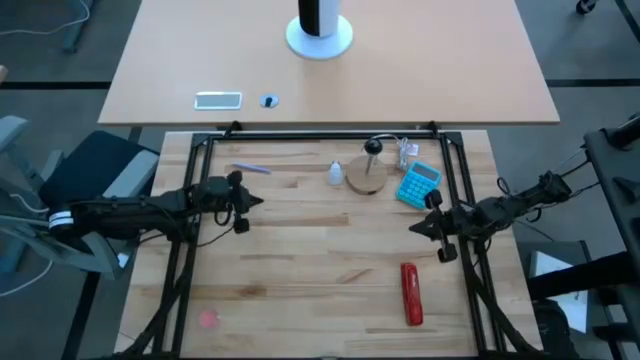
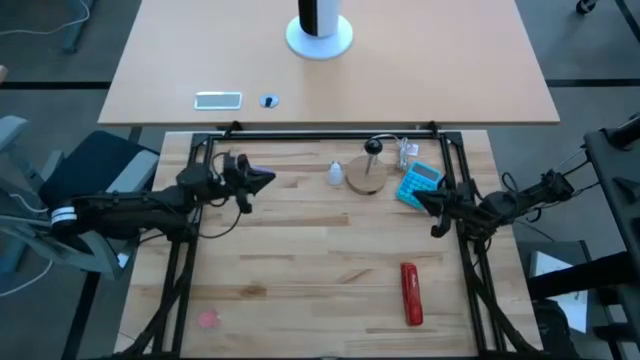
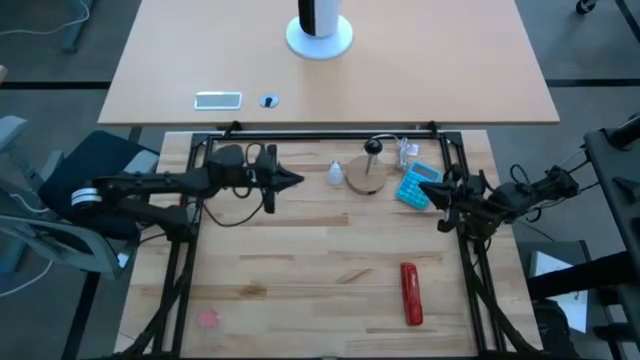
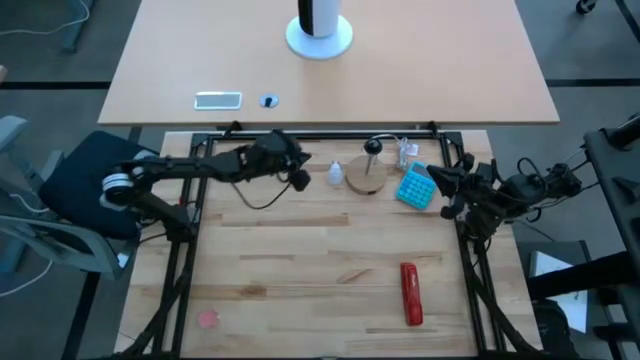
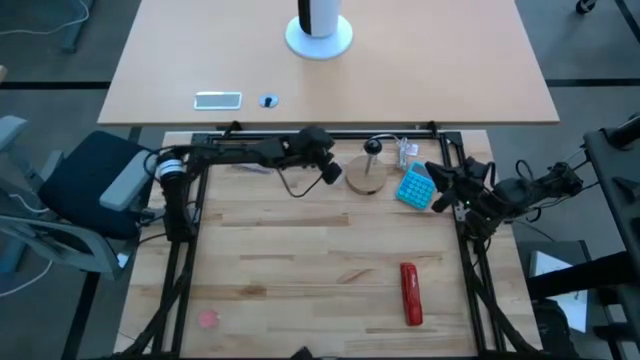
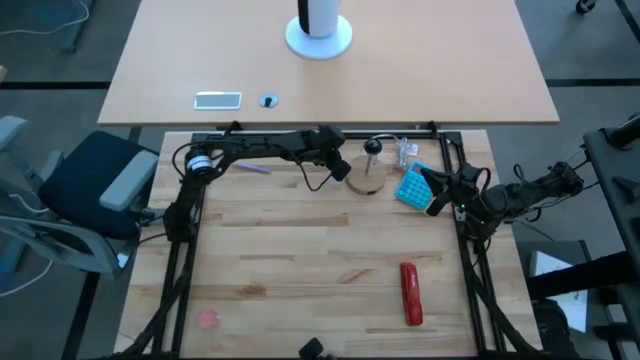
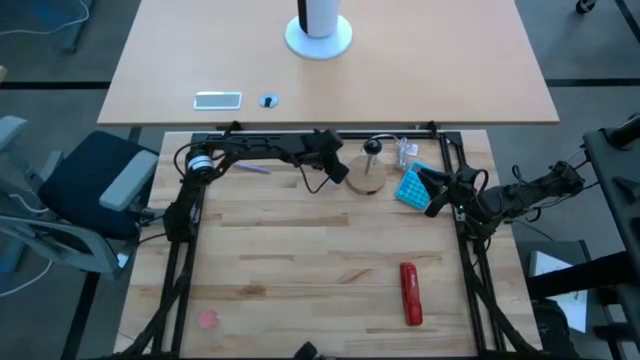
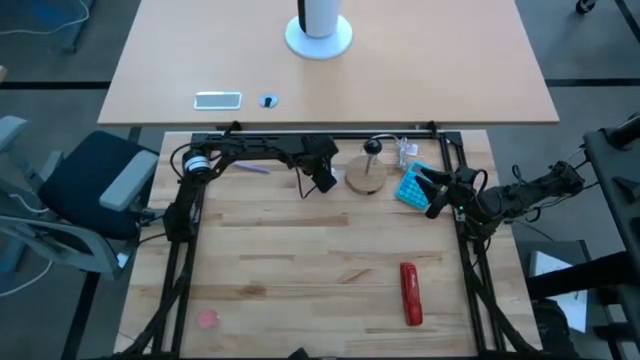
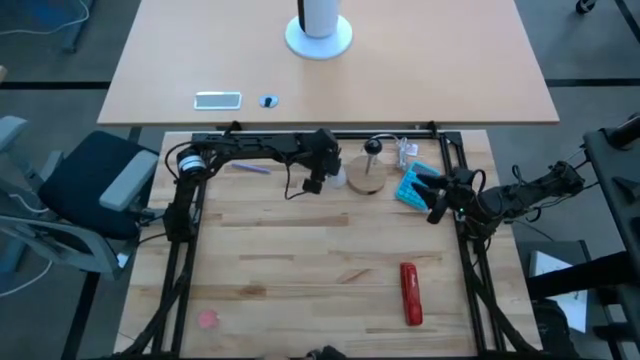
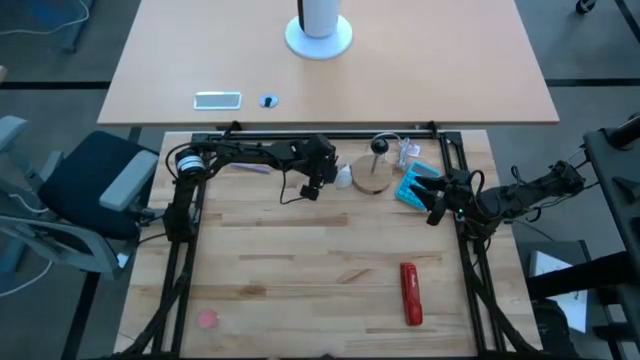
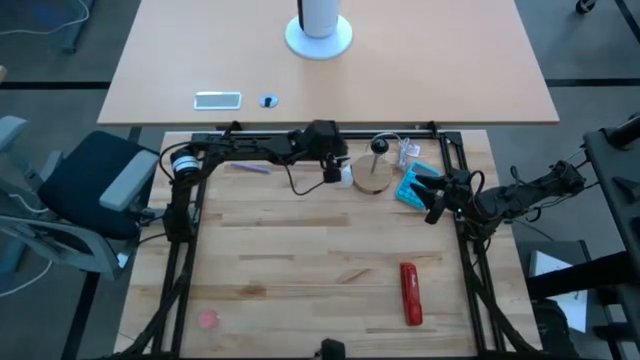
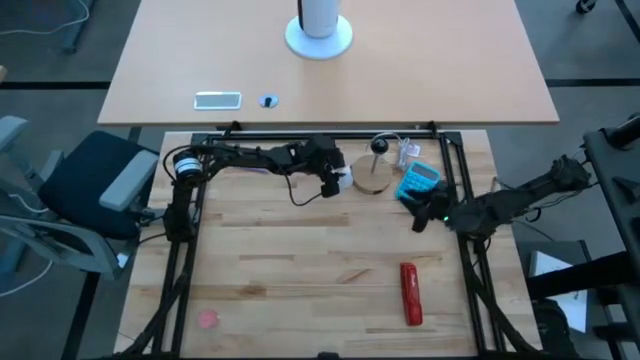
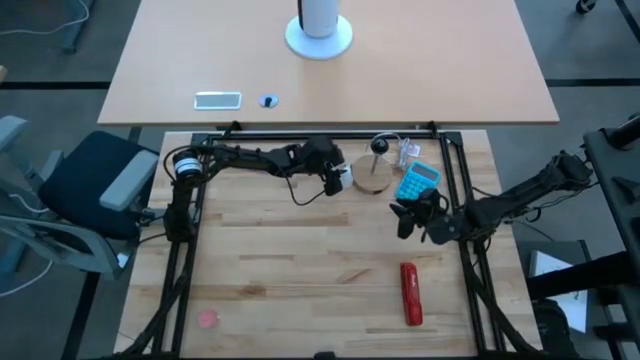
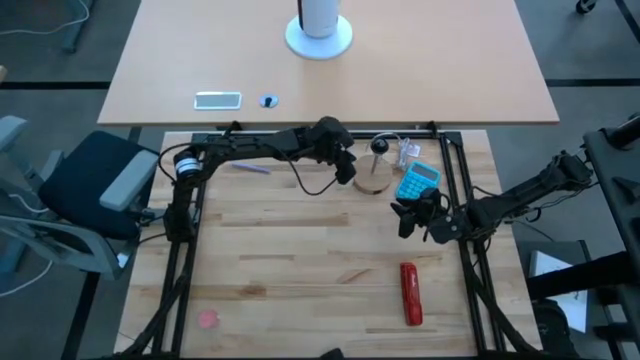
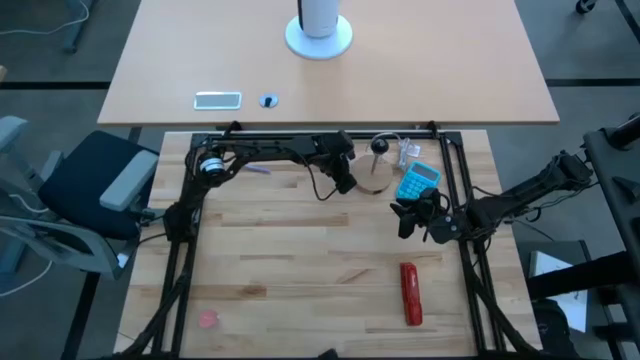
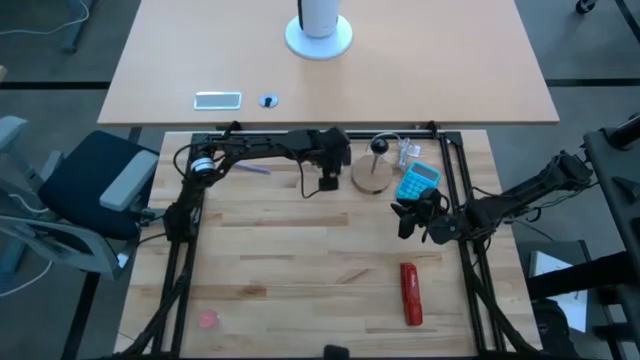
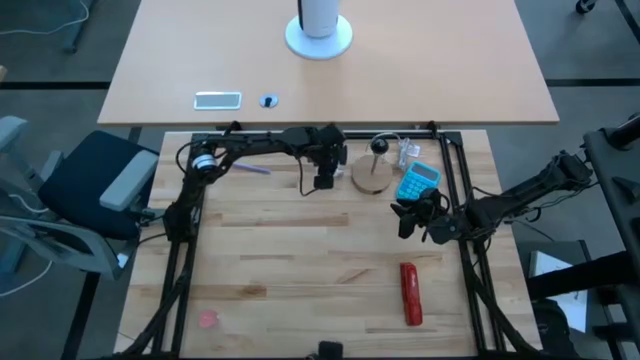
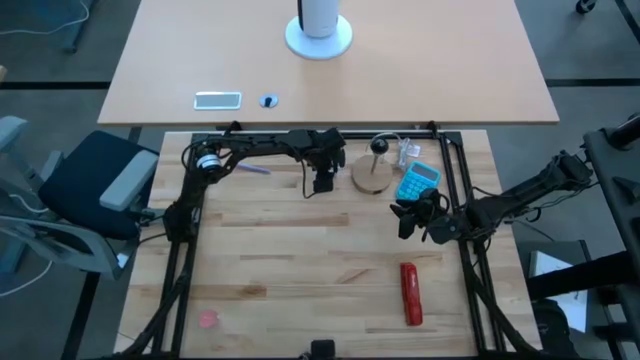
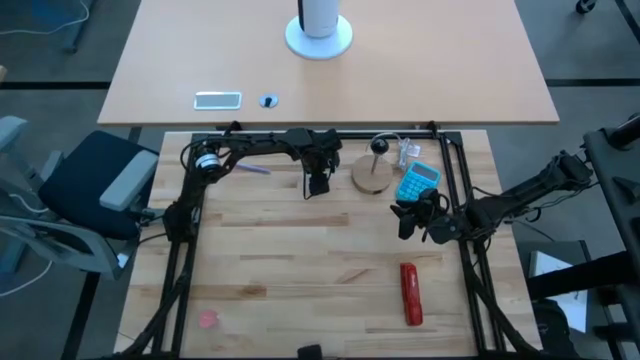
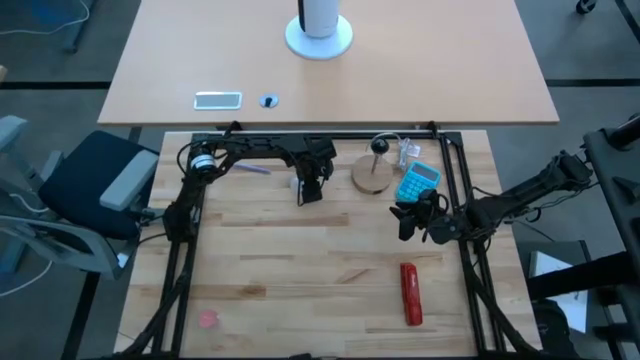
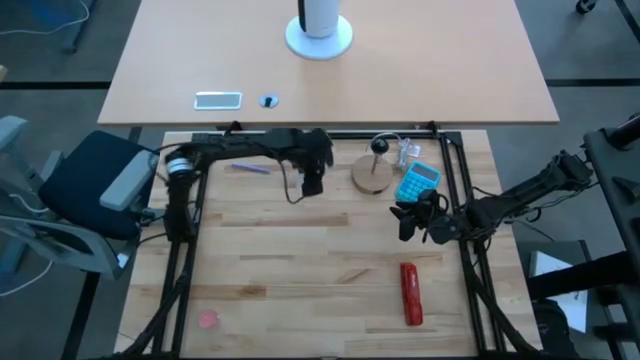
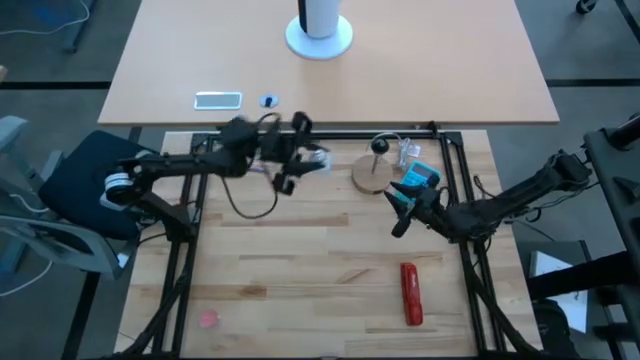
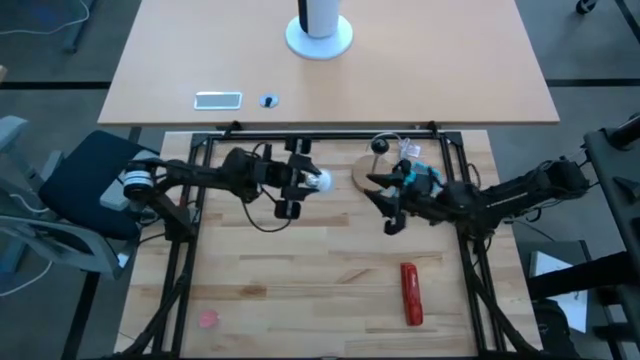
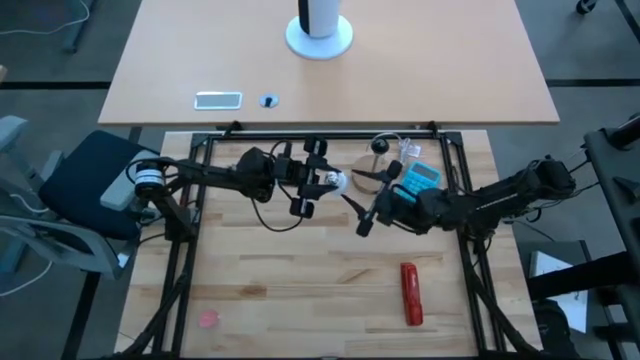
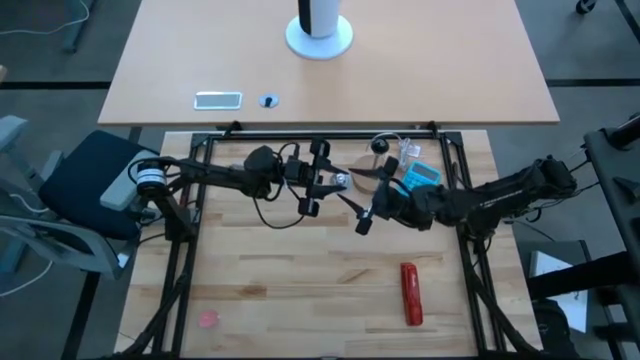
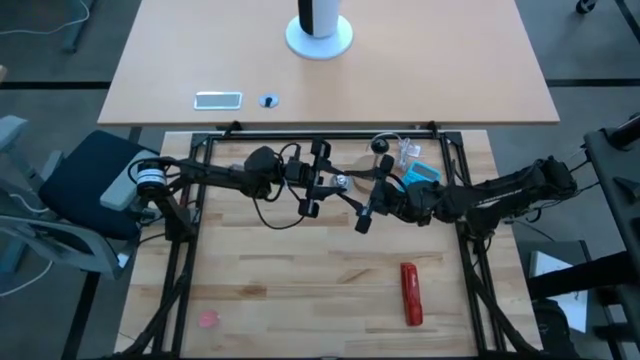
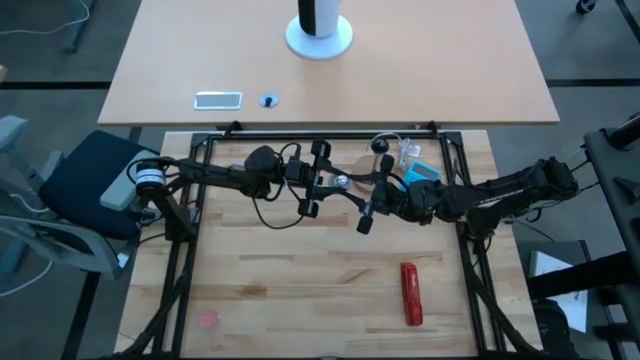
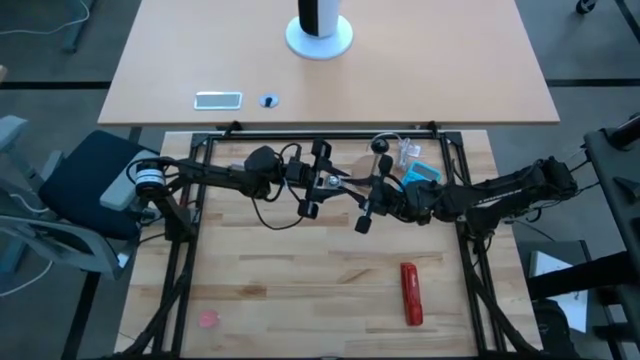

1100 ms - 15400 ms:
Task: Screw lightbulb
Insert the lightbulb into the lamp

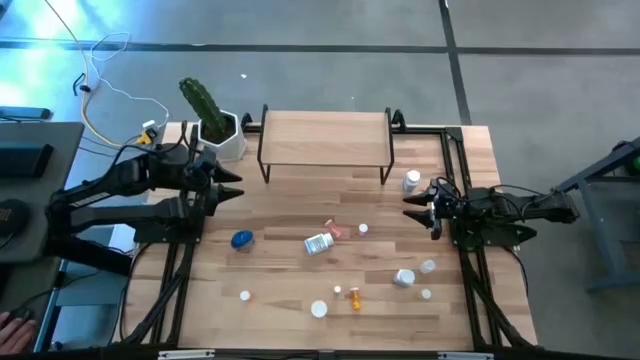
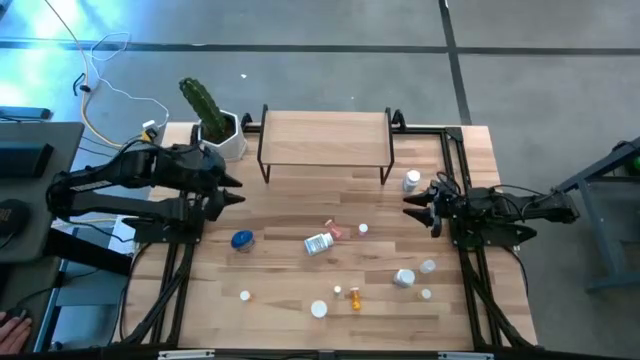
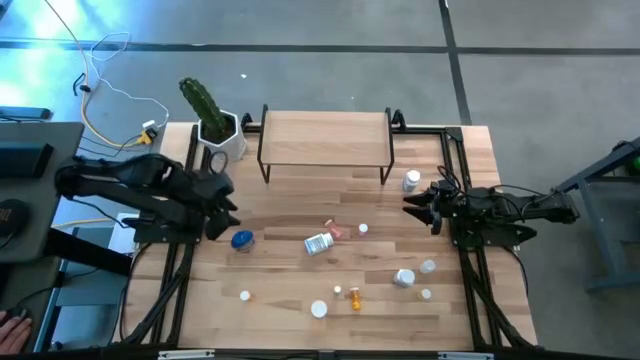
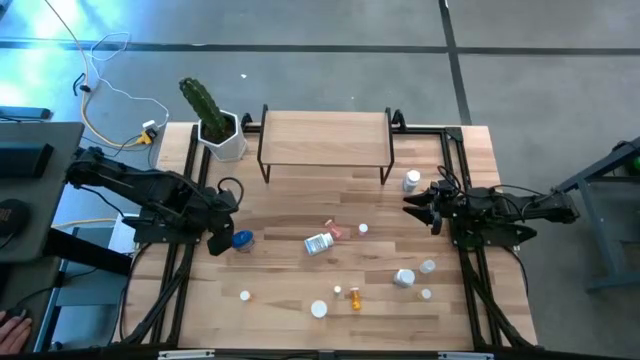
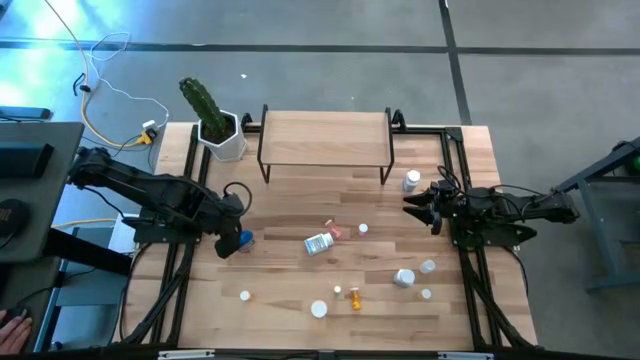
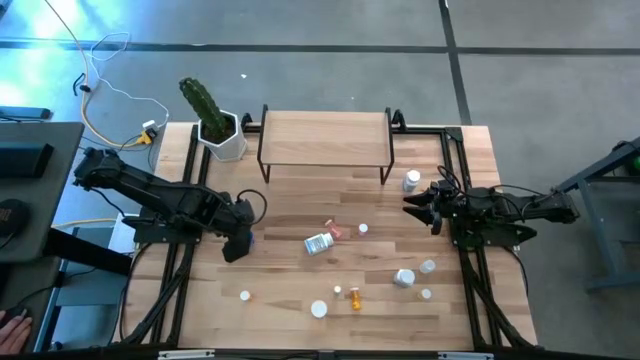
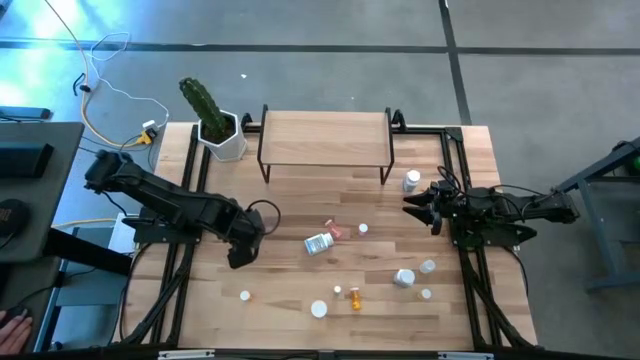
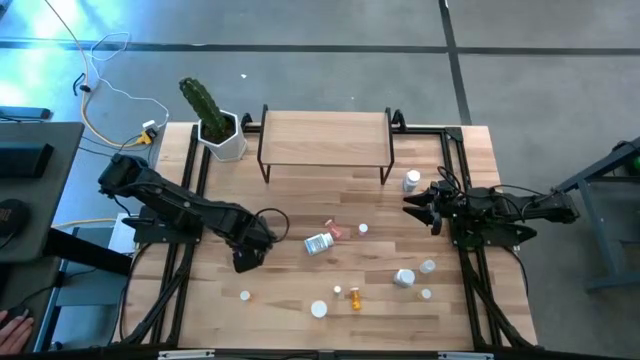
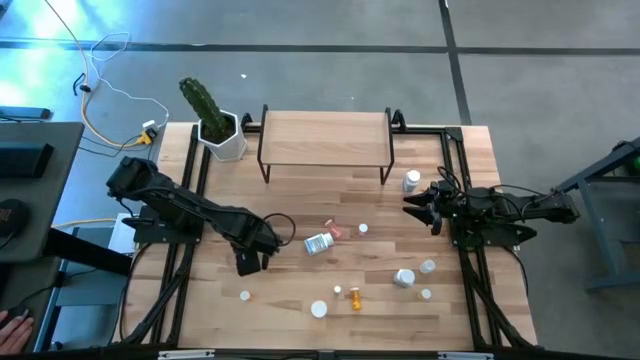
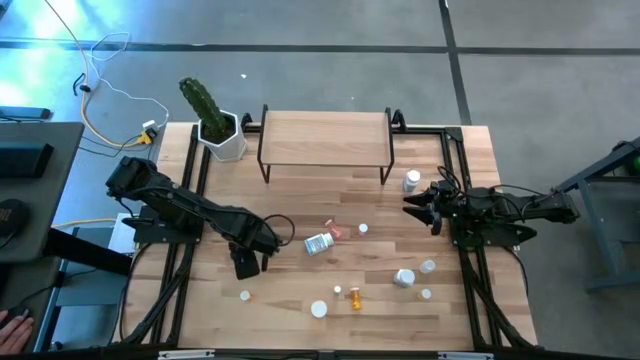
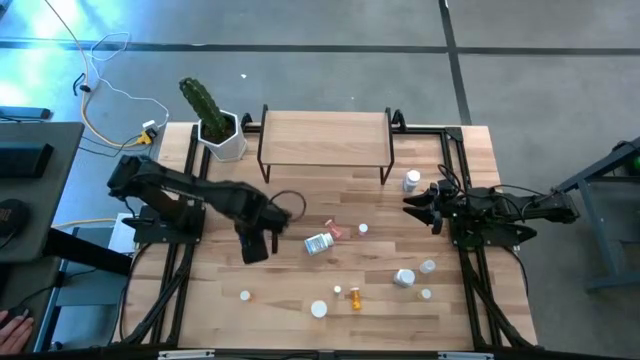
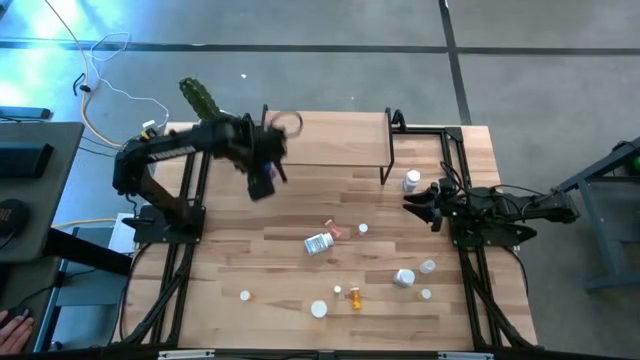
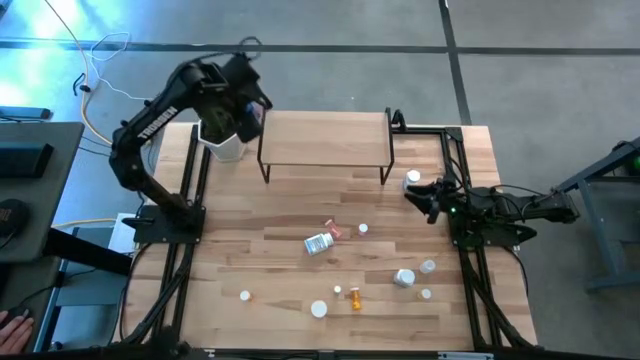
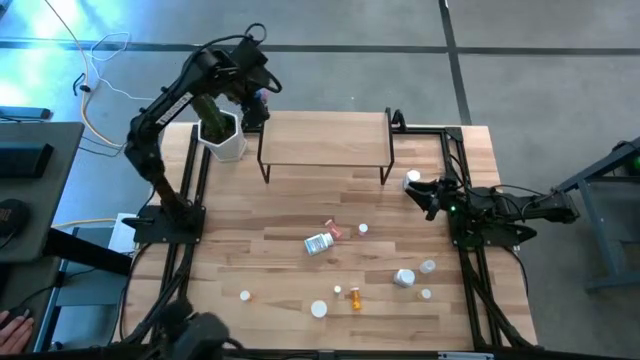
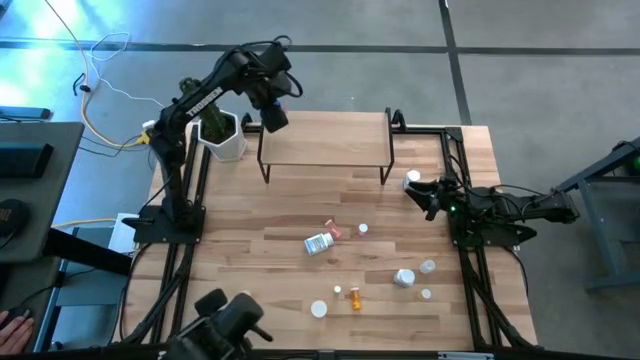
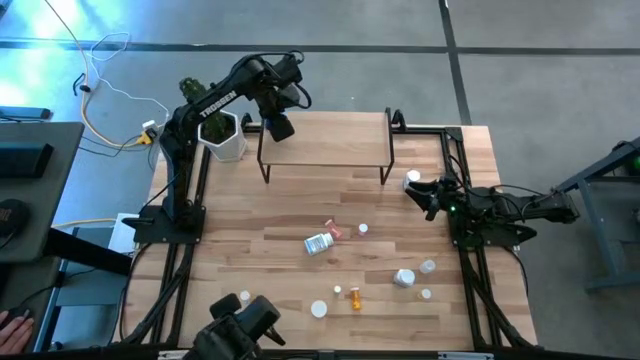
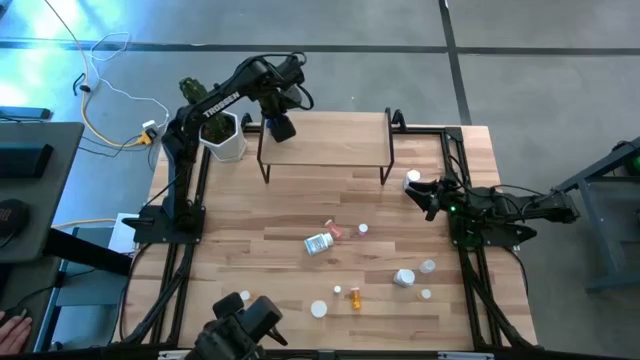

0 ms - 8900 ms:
Task: Pick and place medicine bottles onto shelf by color
Put the blue pill bottle on the shelf
